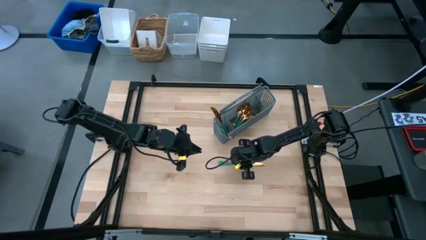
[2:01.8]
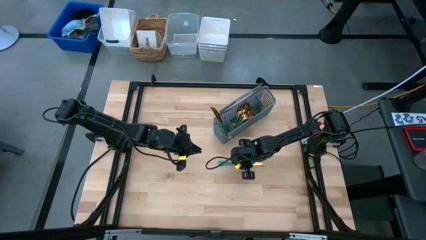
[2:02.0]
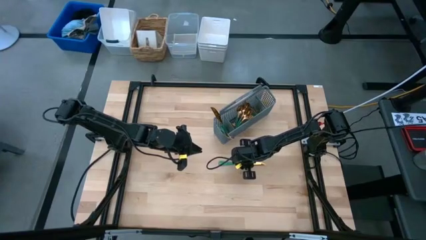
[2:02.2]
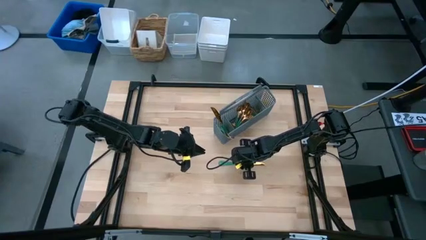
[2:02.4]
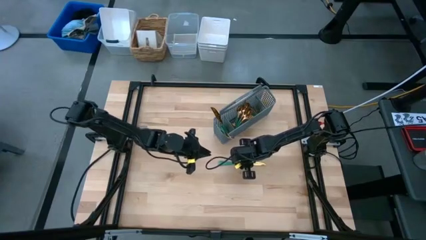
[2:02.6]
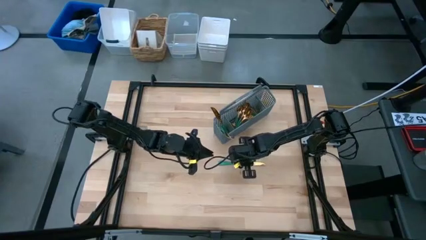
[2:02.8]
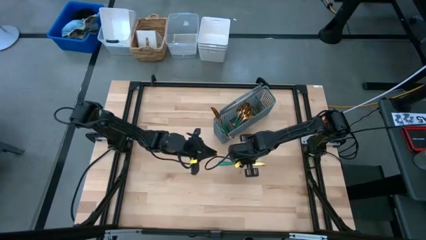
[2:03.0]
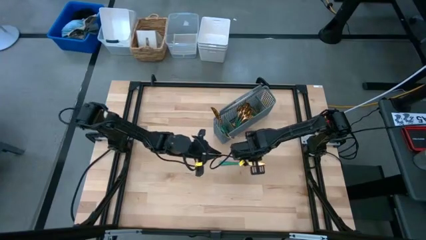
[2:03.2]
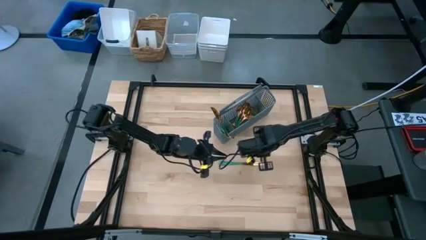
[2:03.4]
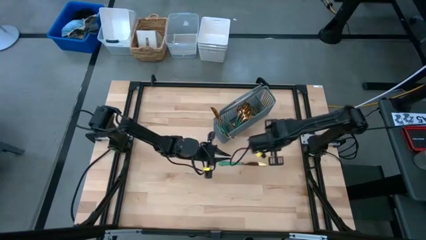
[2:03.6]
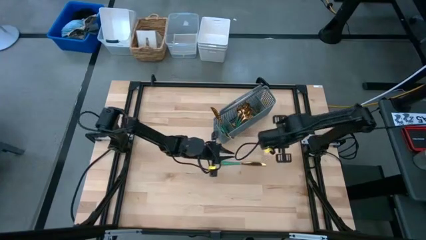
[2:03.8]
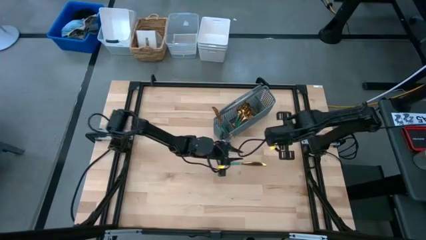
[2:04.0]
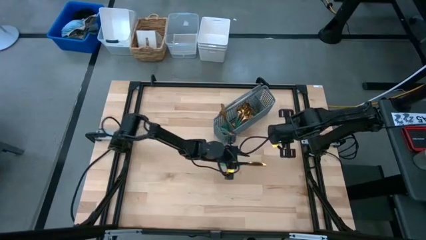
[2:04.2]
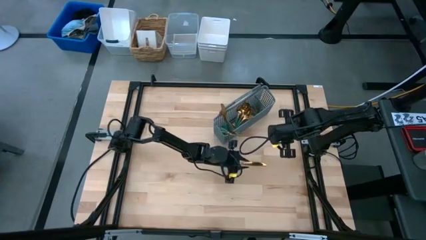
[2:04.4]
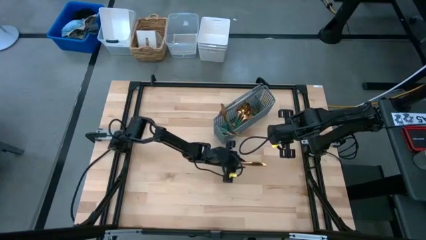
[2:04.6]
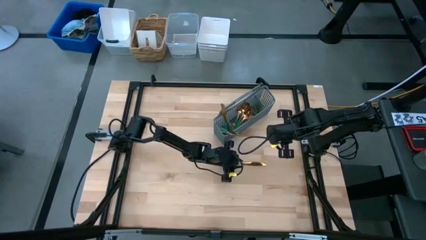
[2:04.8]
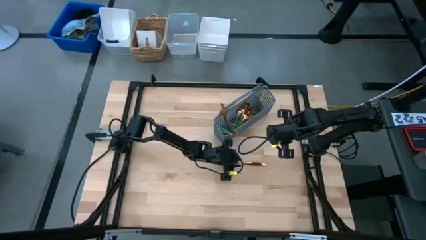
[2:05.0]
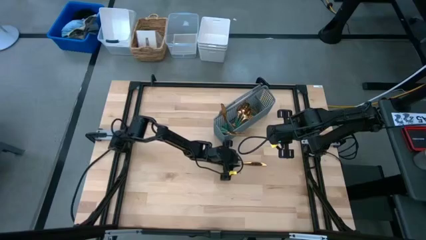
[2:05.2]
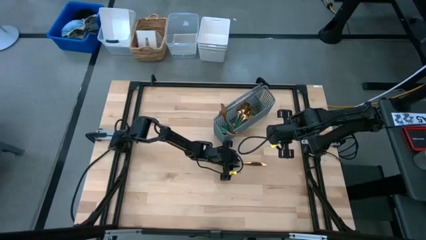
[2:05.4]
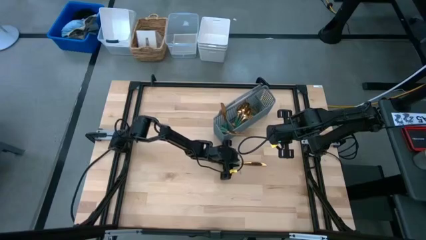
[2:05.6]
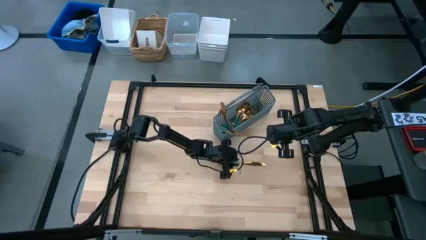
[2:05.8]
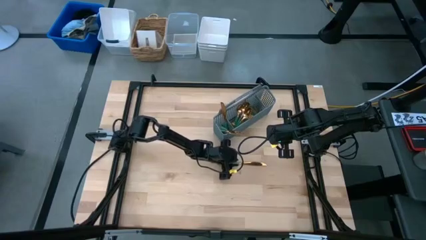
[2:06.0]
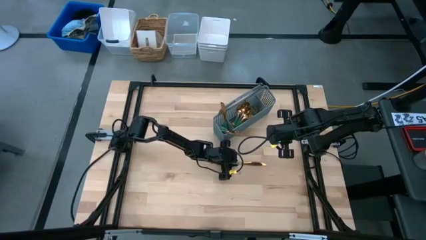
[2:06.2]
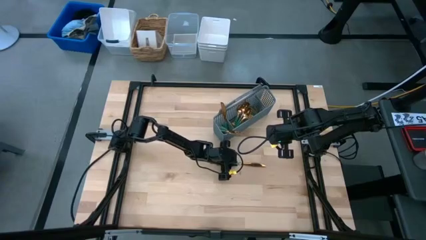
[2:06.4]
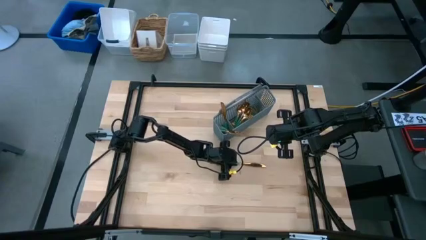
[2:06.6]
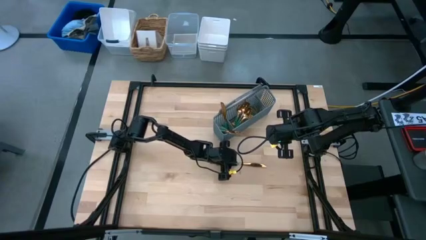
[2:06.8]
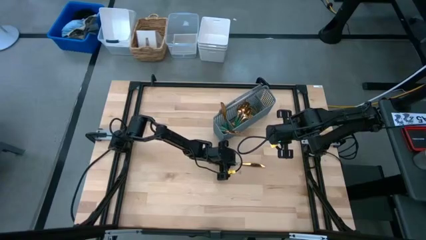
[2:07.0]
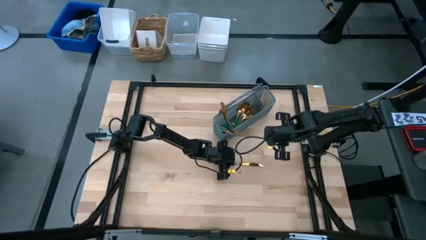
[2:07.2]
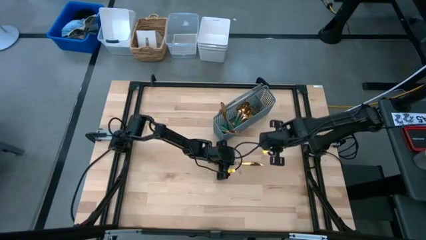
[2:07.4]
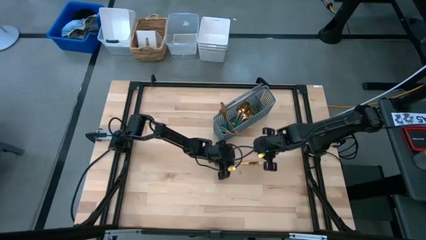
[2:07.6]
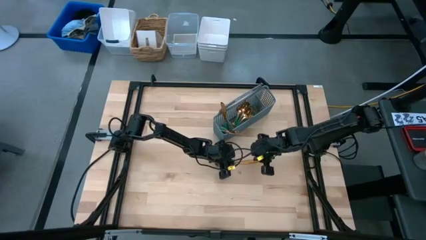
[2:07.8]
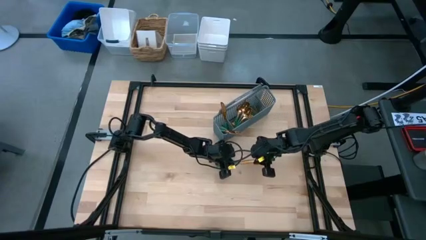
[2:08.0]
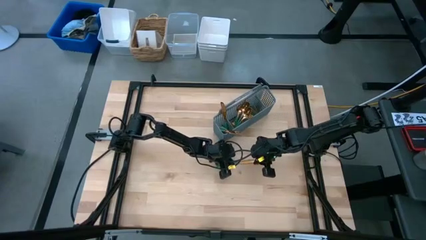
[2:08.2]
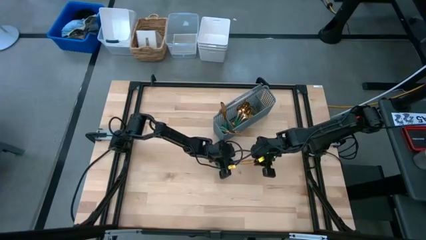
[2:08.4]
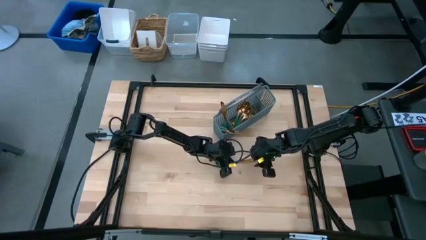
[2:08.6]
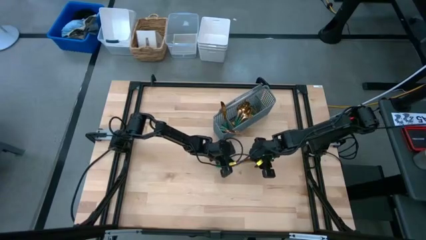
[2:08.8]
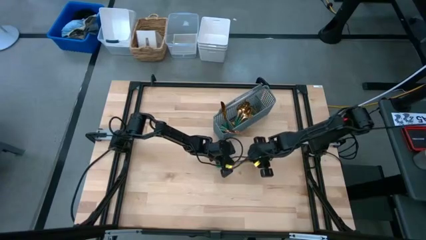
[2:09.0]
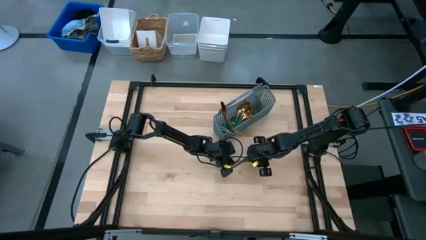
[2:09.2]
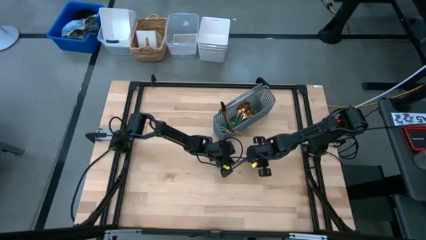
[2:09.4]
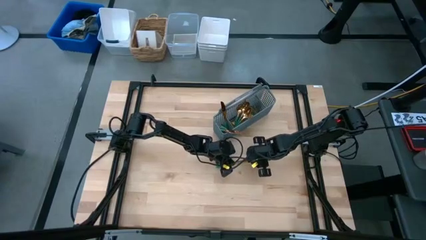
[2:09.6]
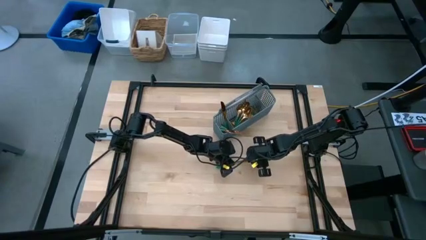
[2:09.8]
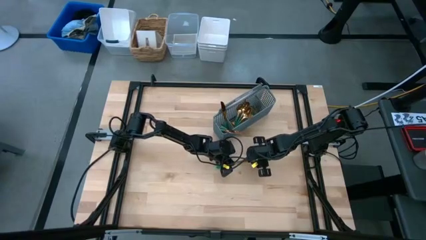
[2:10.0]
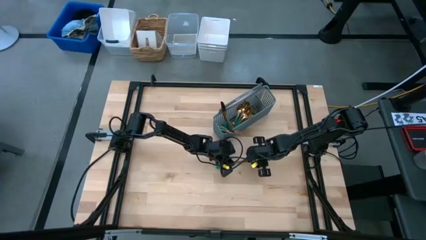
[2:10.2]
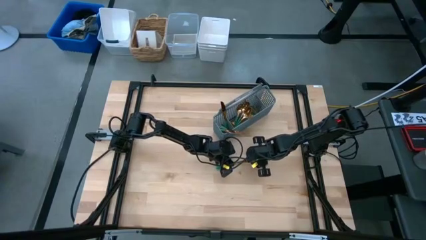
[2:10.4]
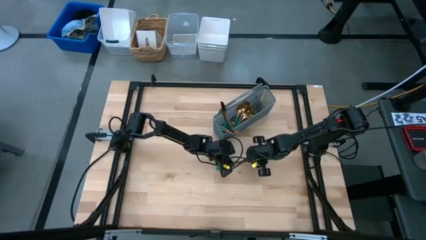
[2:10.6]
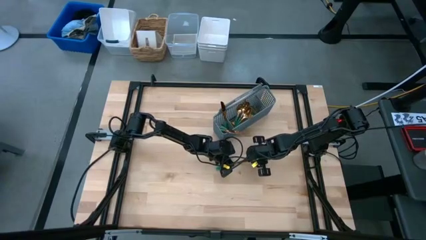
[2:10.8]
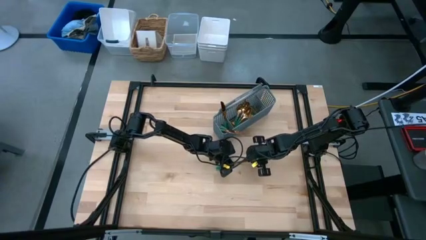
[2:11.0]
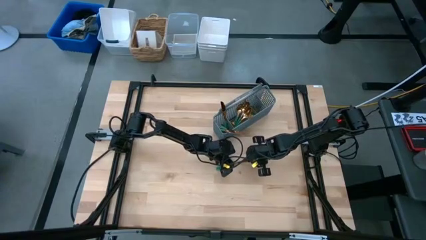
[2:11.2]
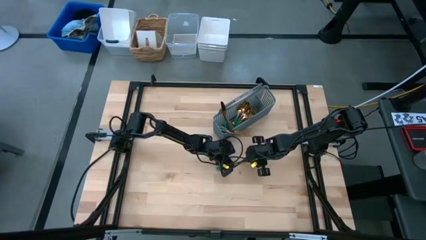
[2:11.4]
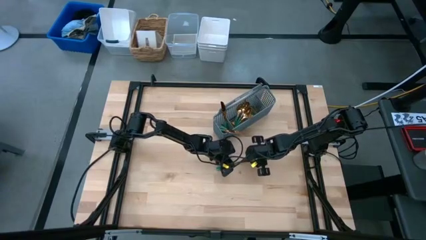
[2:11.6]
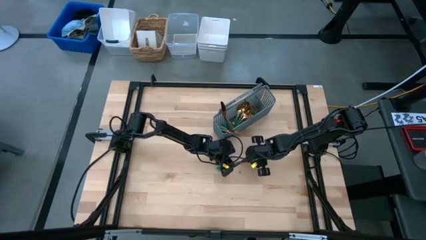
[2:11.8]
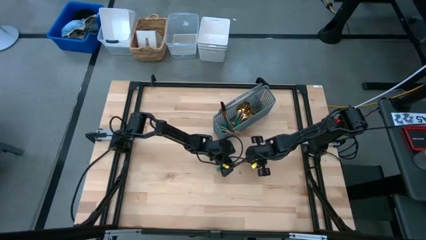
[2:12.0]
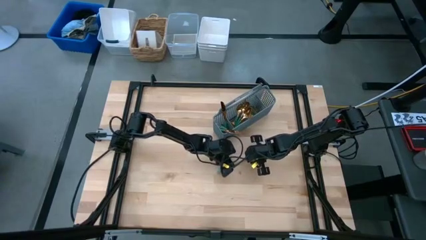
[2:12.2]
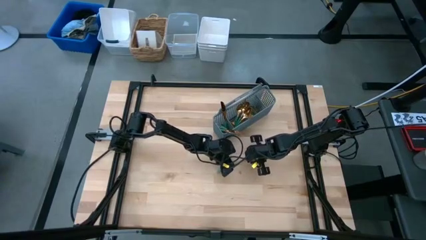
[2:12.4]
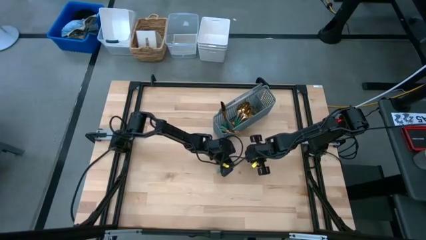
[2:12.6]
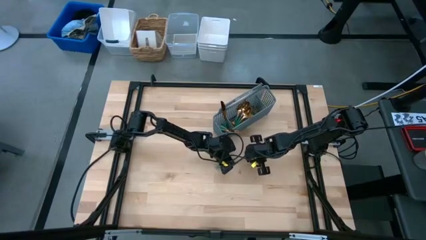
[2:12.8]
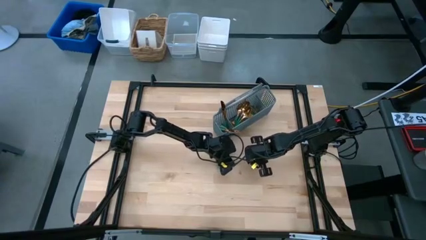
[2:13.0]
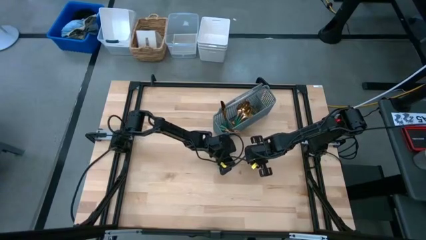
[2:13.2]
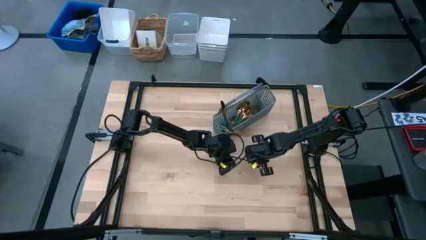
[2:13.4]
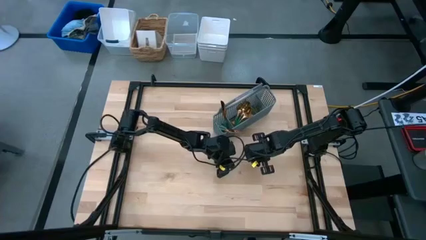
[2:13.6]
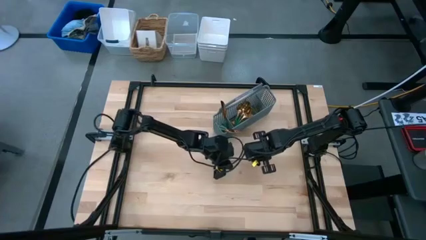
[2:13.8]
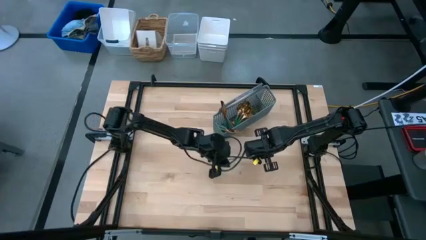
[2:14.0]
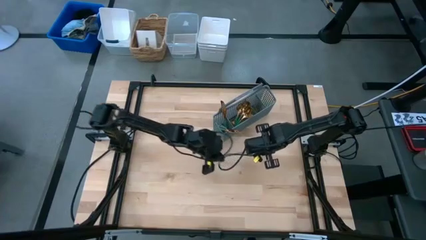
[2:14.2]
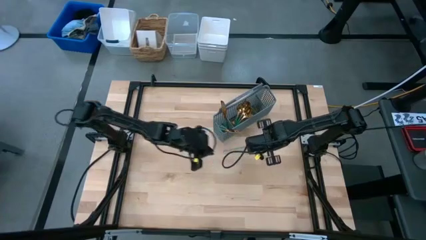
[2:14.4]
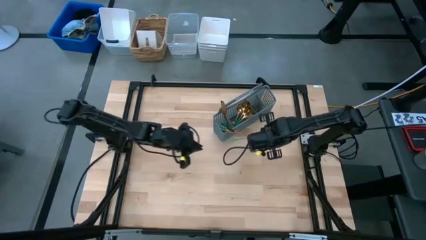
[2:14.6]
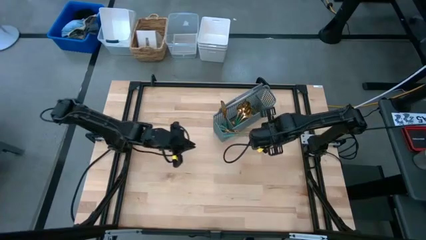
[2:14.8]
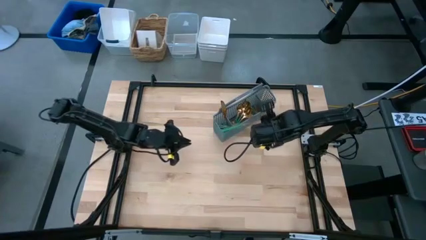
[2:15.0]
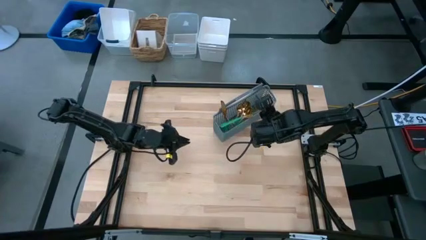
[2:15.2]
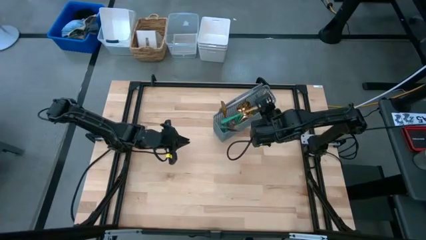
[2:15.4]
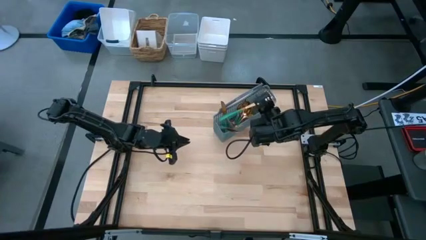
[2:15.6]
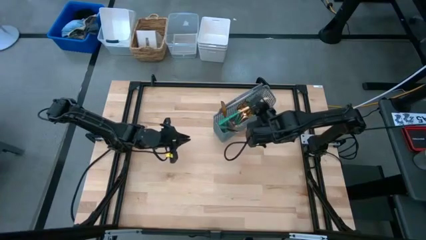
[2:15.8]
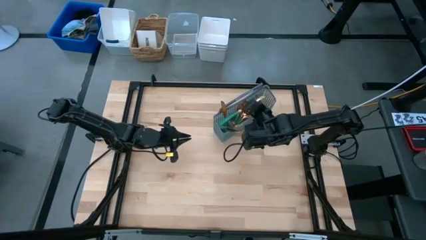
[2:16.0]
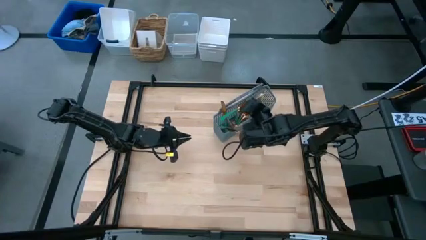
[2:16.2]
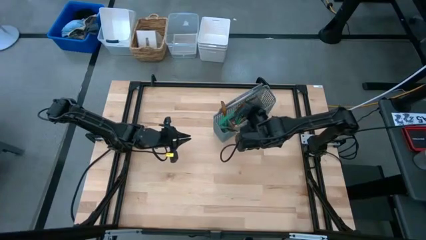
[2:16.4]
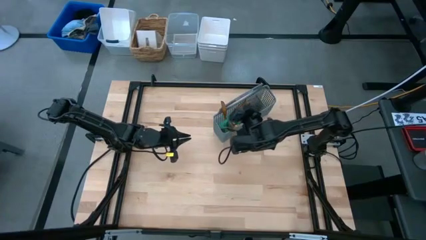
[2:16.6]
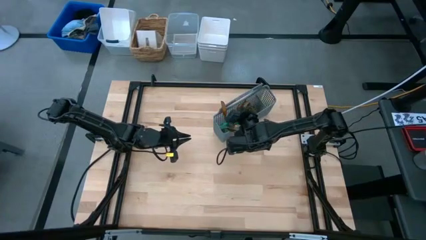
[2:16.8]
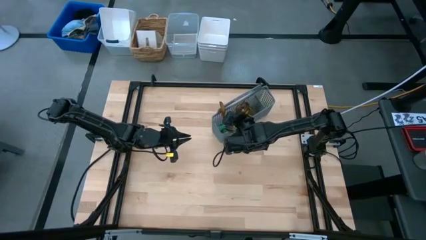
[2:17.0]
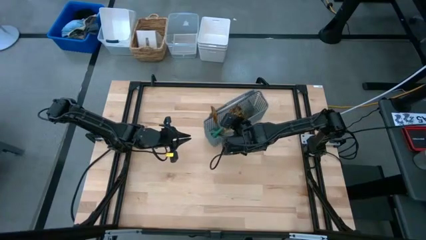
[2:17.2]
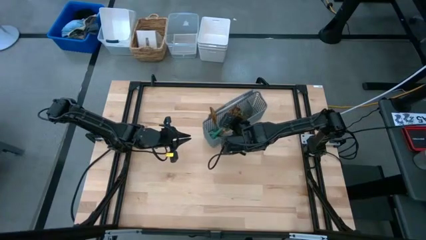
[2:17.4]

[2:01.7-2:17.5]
Task: Sort silverware
Put the knife into the basket
